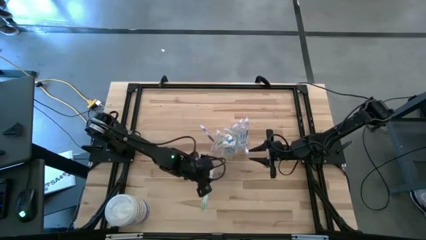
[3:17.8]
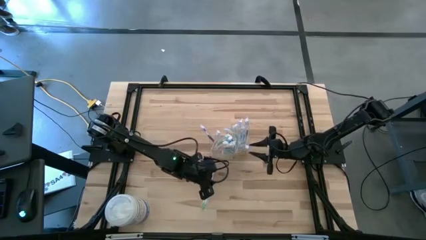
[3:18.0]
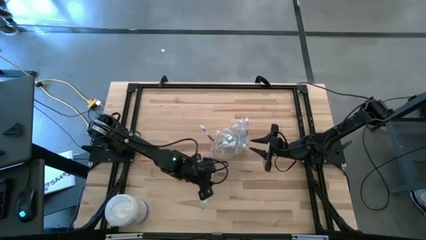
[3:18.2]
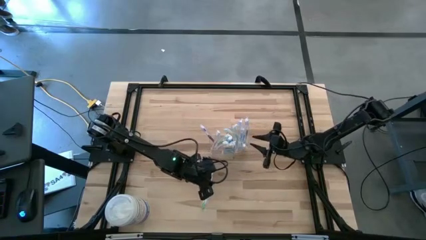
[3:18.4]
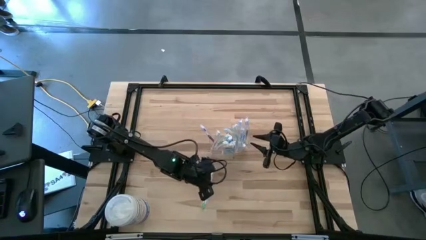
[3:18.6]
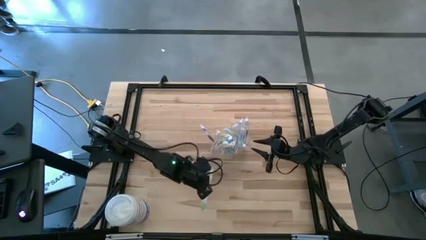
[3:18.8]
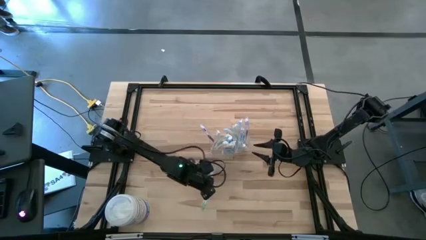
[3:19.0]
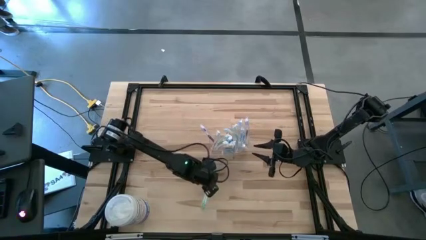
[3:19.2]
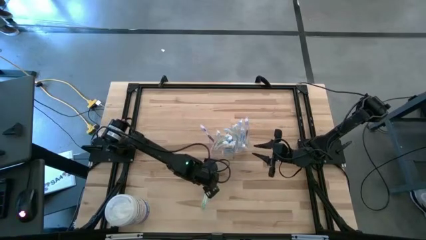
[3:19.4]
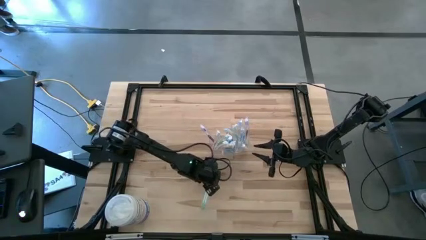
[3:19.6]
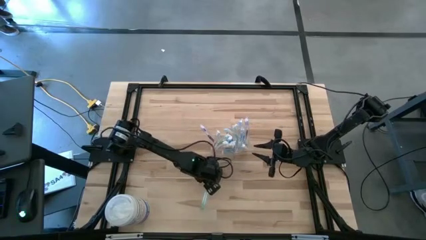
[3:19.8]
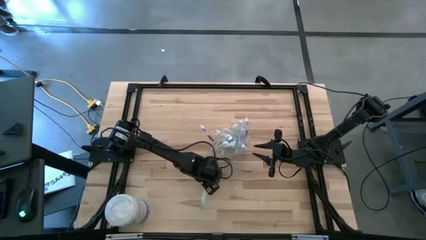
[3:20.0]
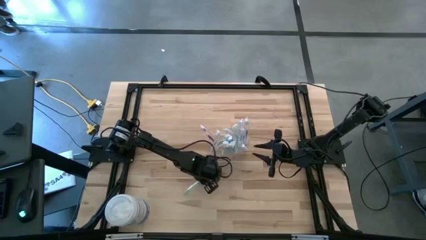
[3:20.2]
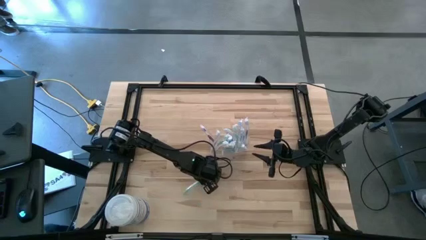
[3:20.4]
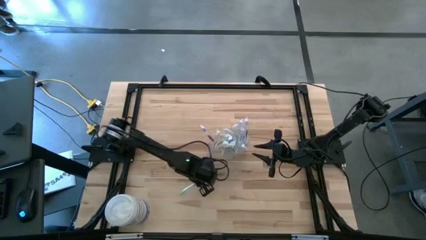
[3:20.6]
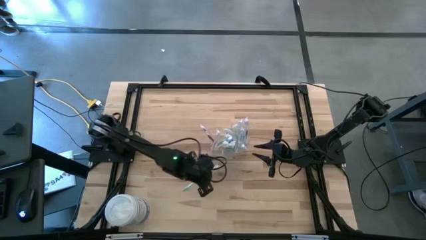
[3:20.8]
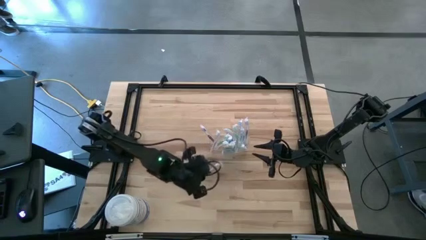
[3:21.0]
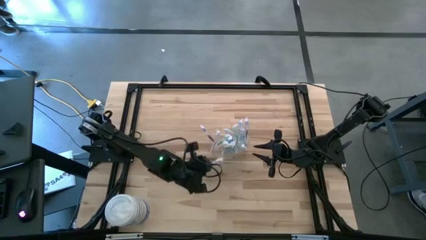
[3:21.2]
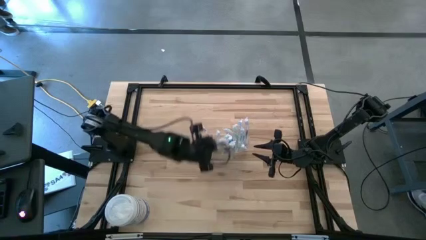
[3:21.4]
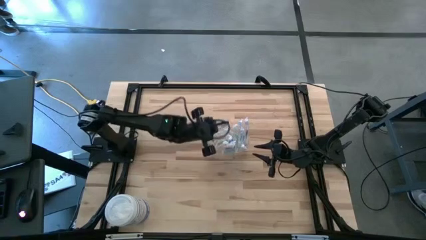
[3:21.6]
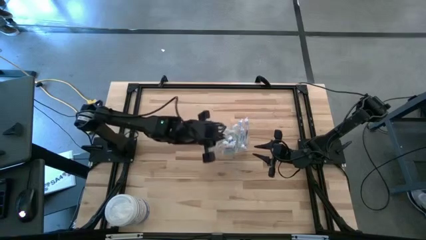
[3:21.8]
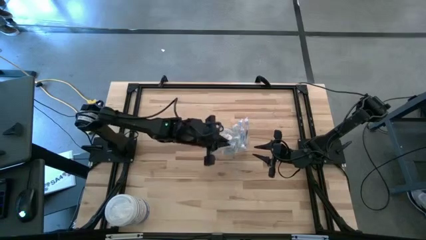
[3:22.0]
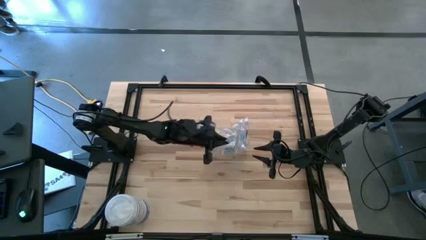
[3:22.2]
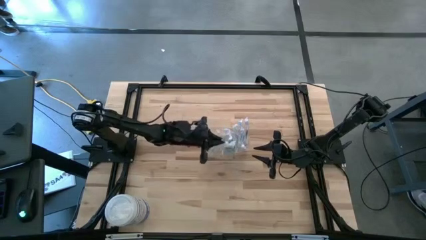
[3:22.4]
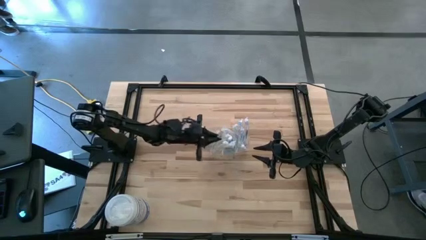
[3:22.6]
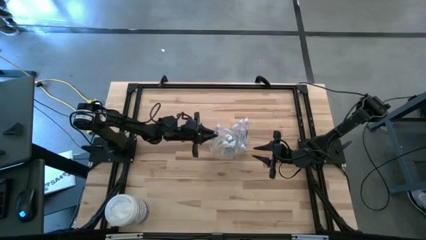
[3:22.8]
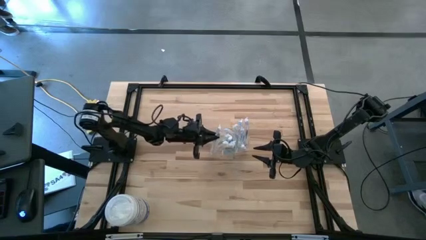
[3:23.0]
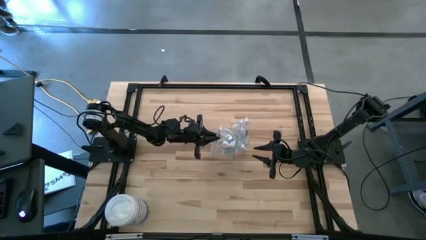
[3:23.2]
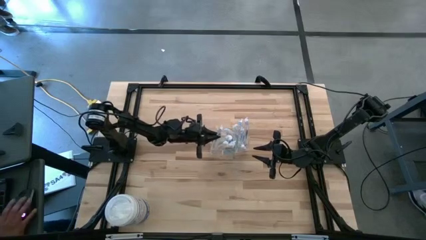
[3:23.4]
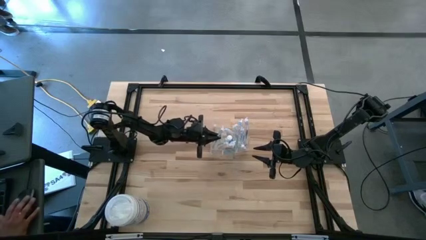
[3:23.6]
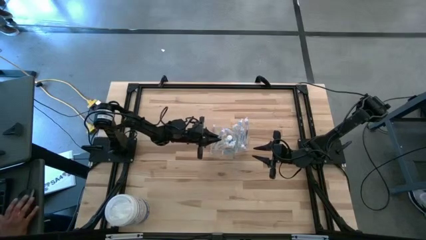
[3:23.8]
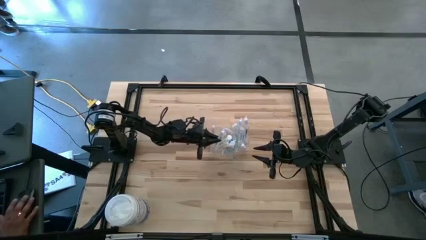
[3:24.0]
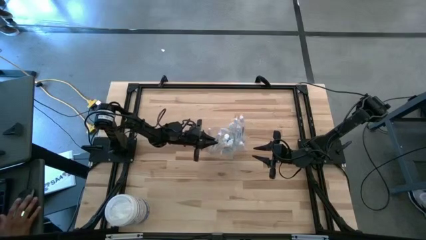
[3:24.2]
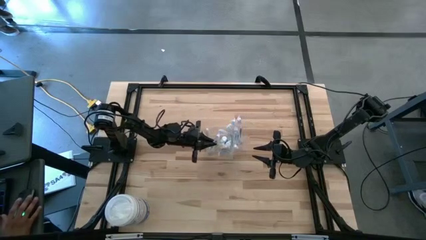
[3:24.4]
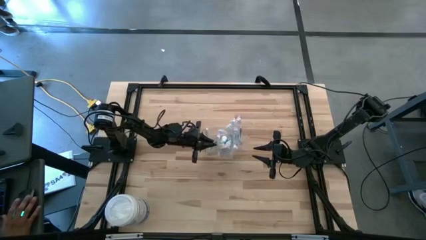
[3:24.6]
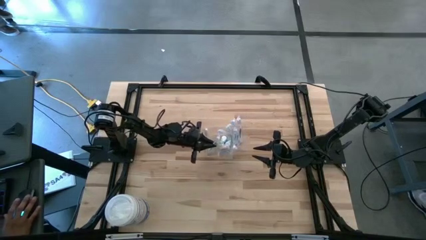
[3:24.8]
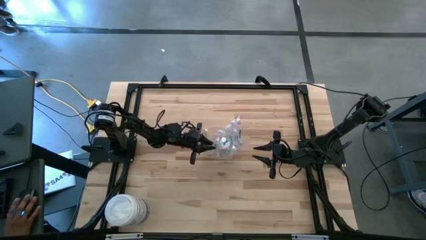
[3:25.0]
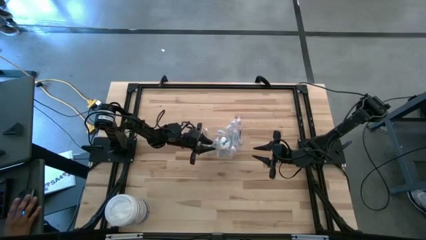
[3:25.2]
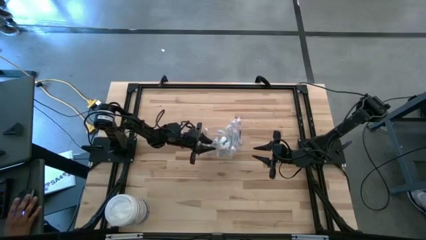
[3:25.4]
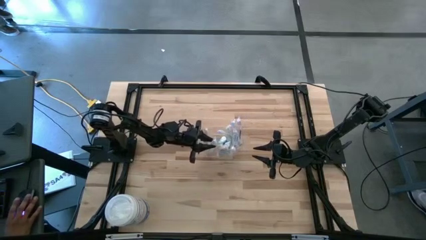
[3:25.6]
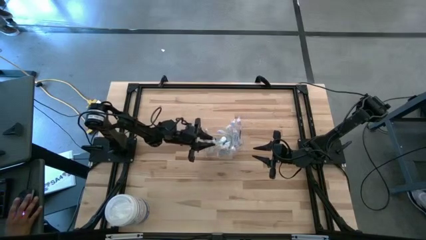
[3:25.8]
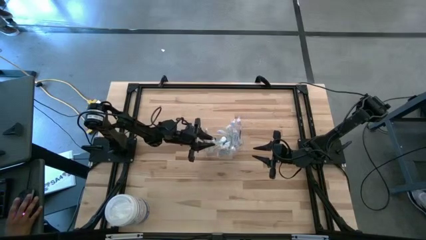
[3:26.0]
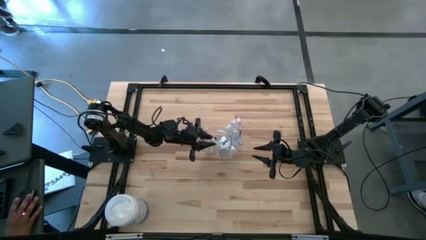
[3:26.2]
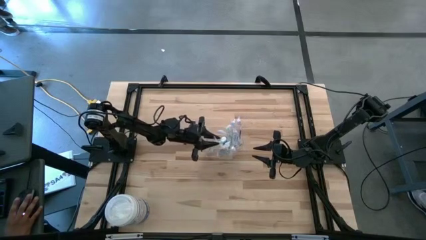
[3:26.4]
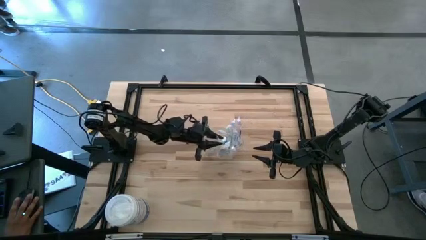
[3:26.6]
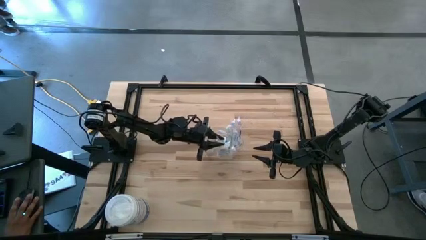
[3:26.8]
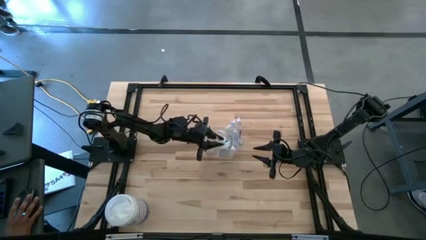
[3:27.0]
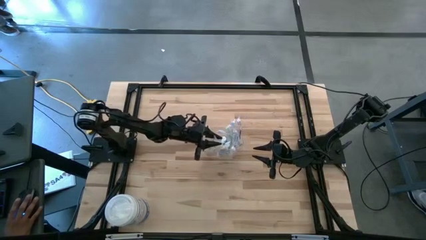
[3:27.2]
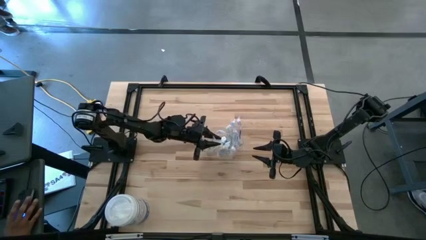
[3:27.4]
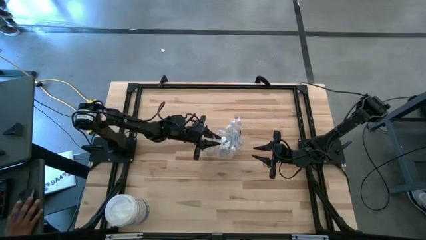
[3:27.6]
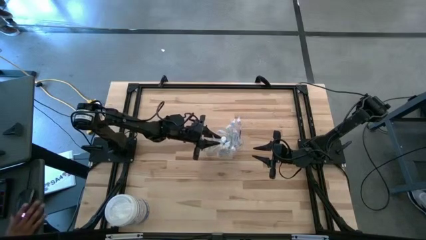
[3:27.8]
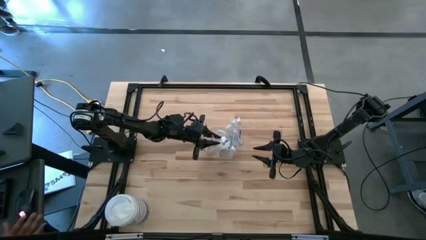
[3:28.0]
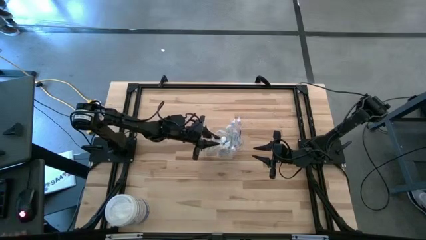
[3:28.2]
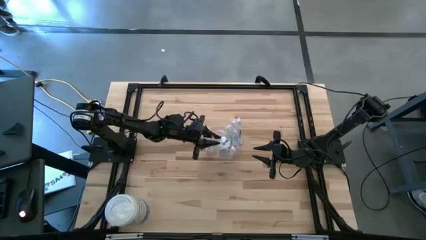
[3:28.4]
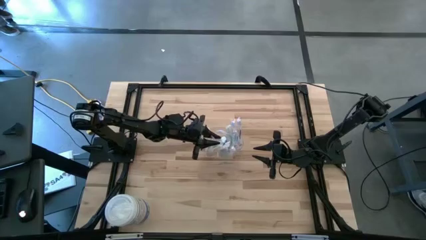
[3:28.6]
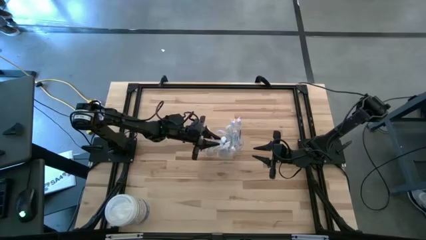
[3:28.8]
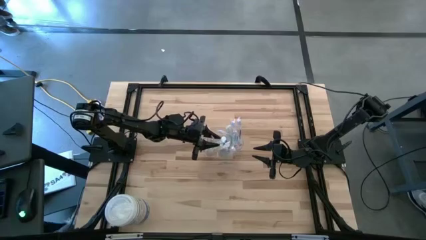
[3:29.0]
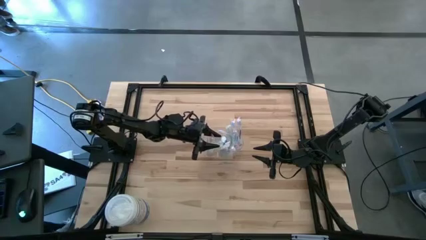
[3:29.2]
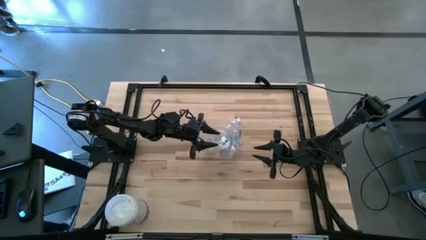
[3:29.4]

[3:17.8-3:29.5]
Task: Pick & Place toothbrushing station
Put the green toothbrush into the wire organizer

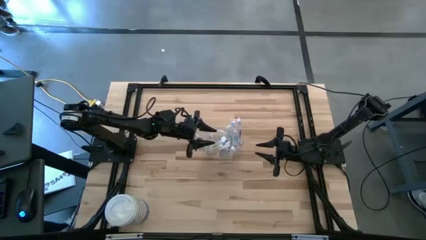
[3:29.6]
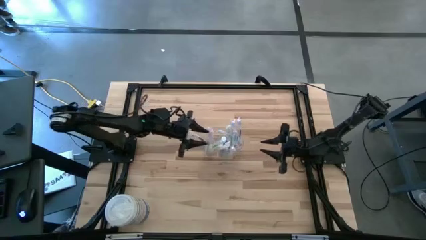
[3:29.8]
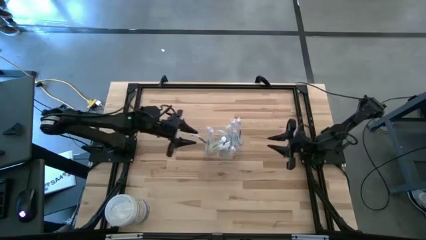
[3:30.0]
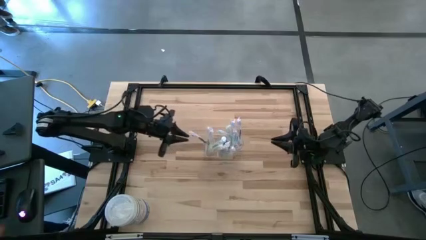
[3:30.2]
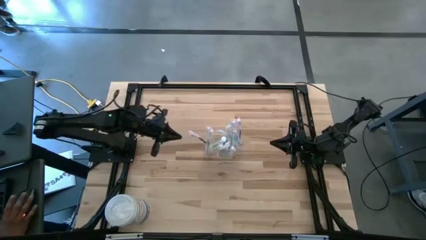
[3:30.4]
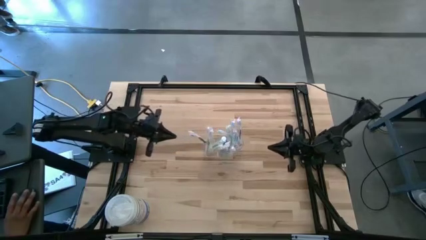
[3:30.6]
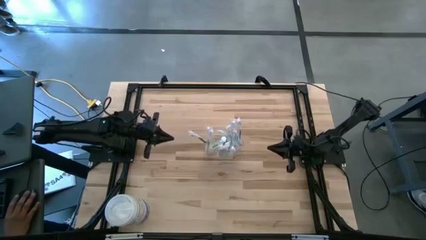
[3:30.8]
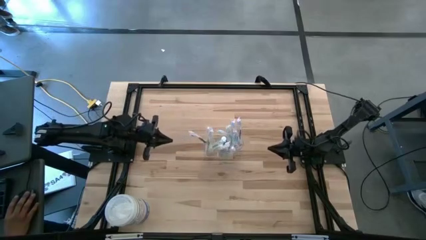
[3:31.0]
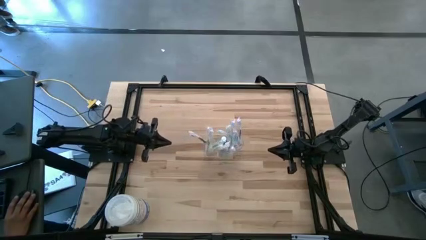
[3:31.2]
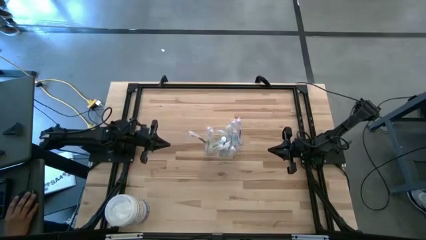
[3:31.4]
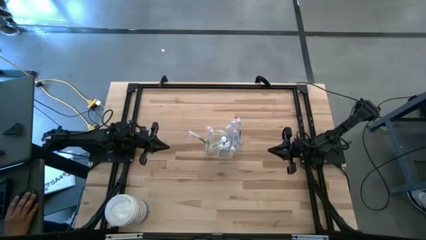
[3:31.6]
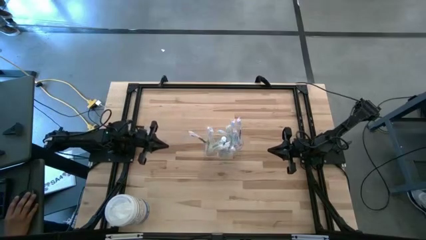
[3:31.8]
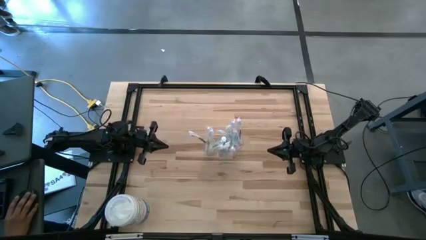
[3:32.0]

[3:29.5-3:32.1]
Return to Home Position
